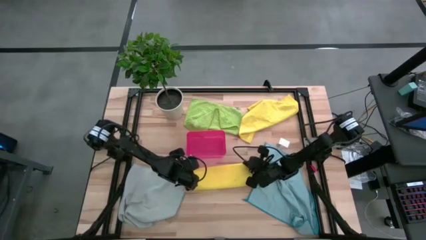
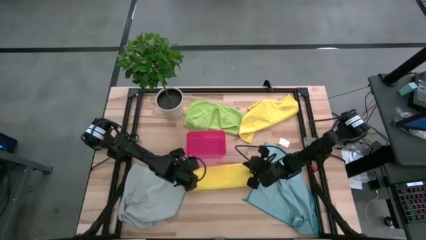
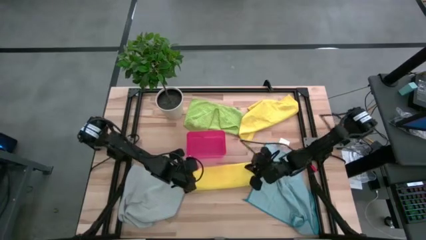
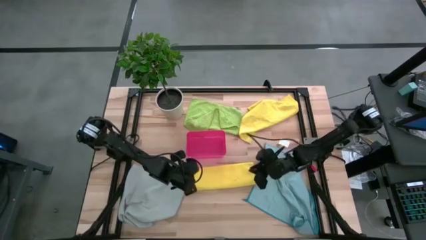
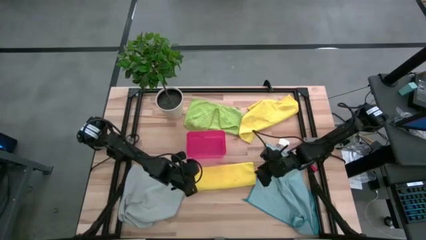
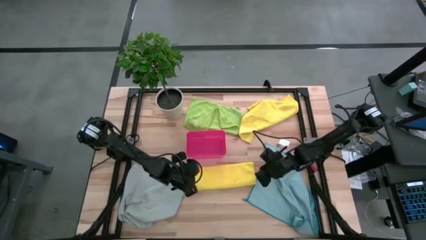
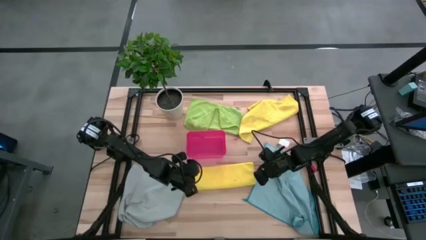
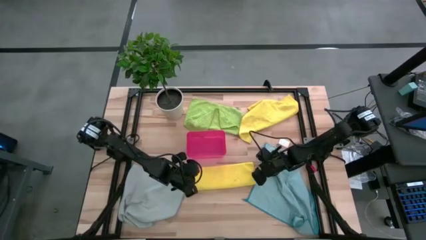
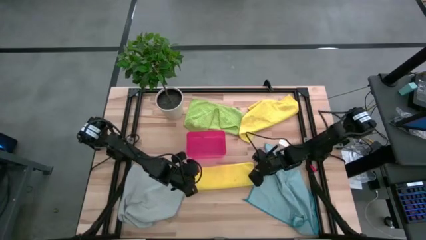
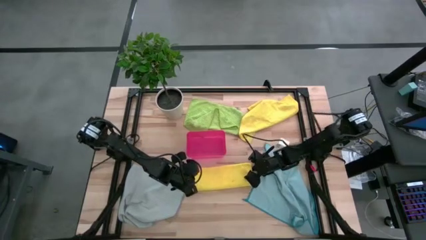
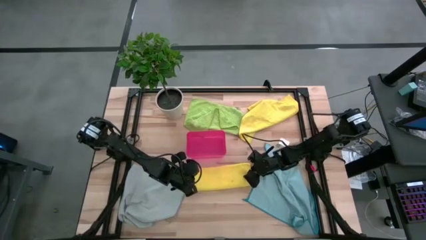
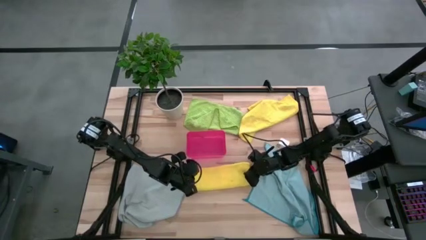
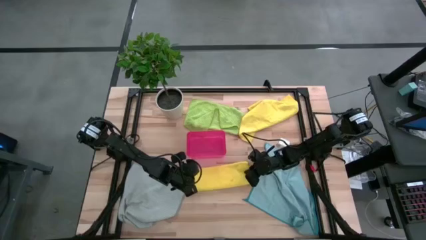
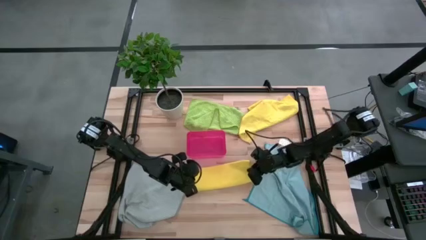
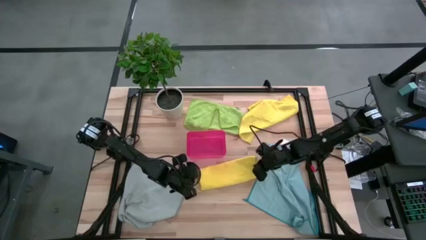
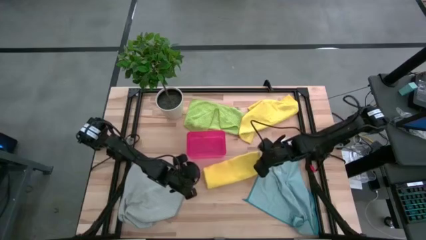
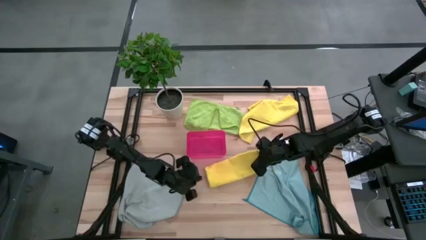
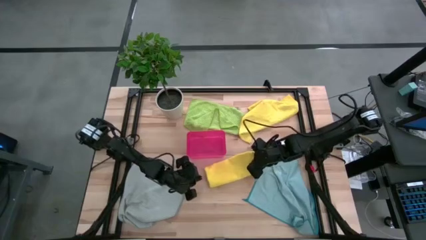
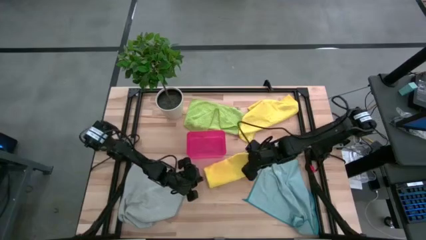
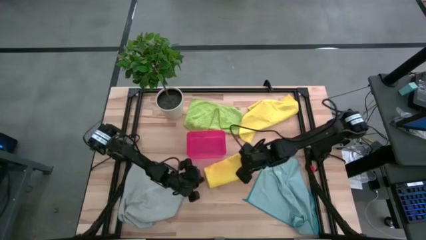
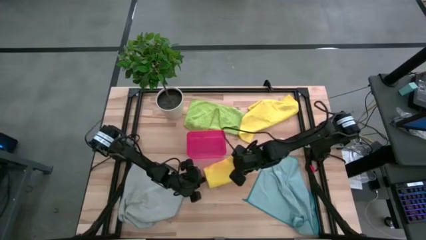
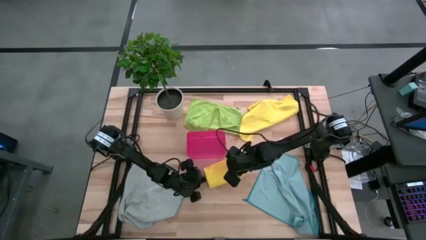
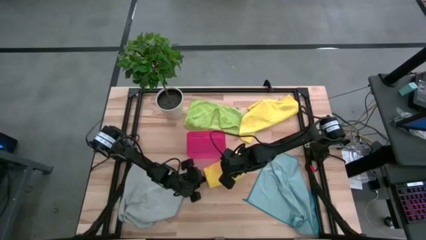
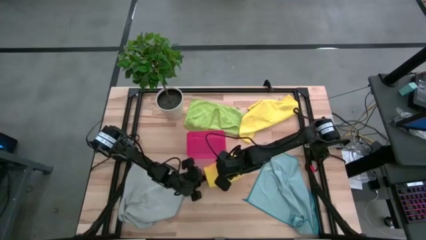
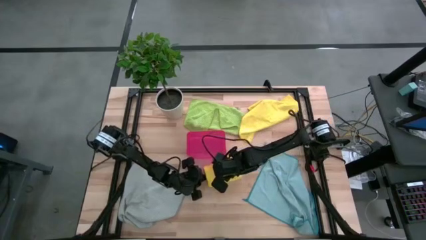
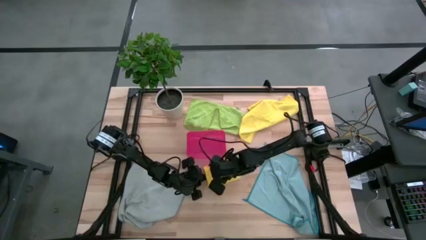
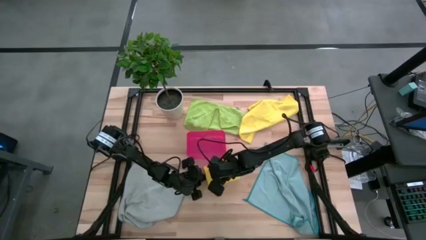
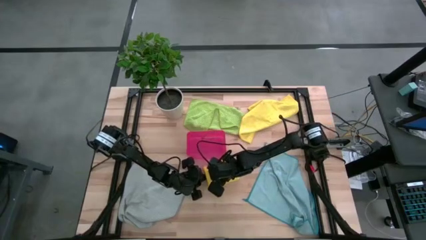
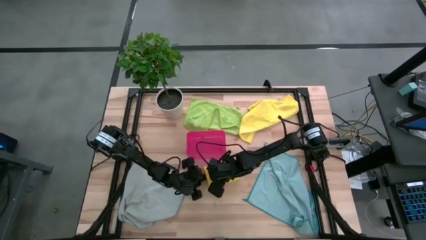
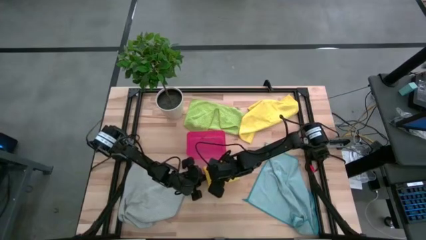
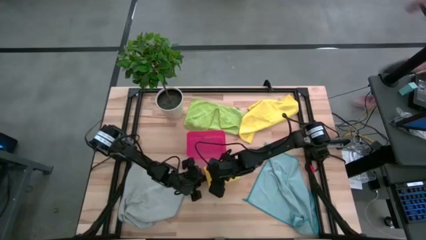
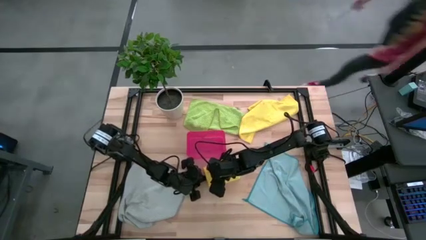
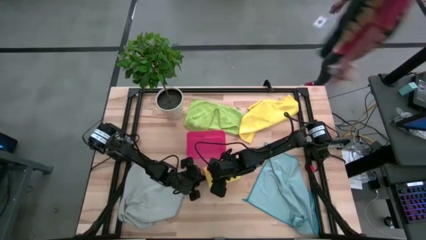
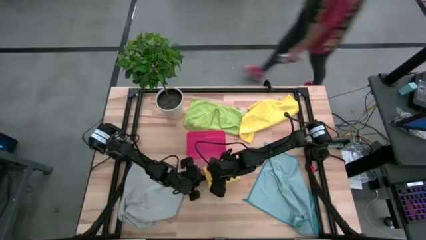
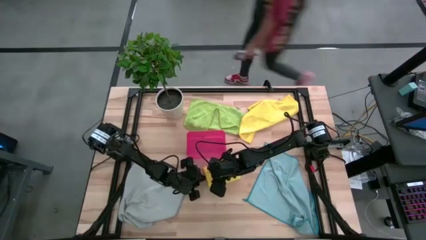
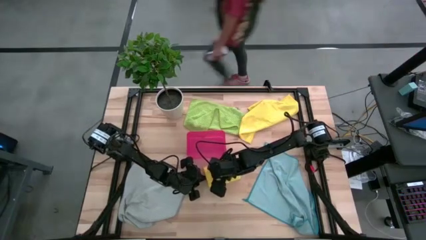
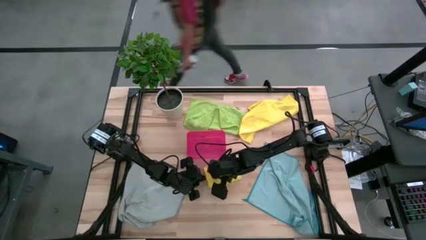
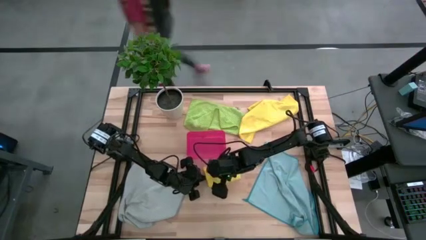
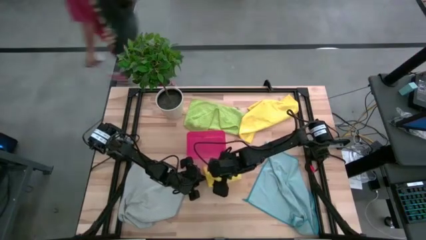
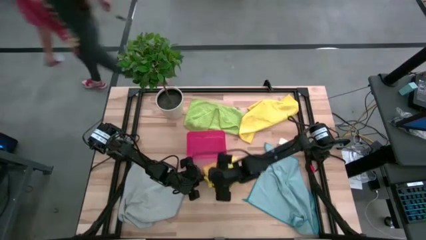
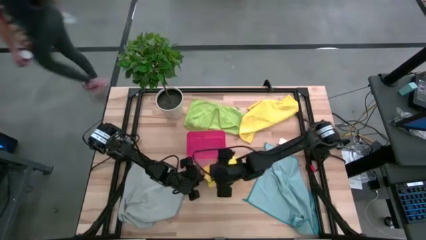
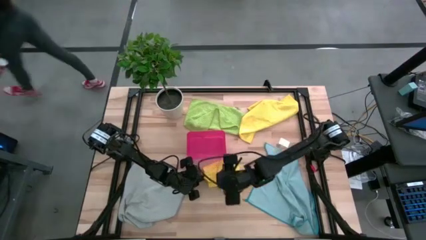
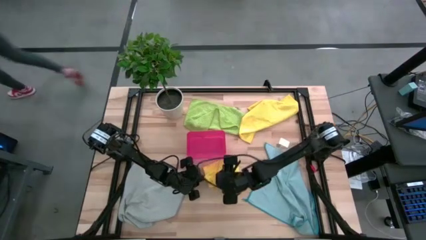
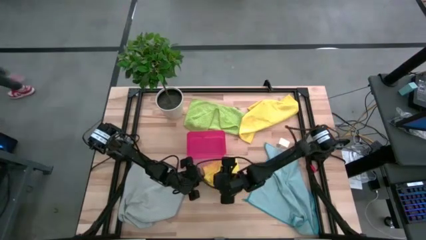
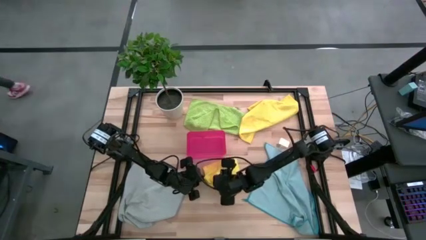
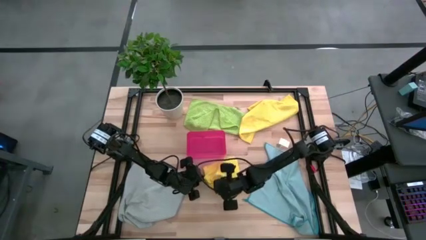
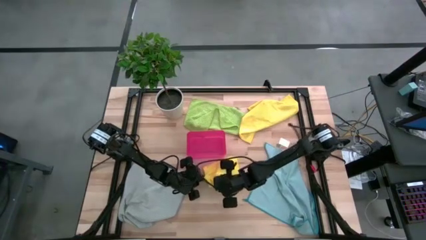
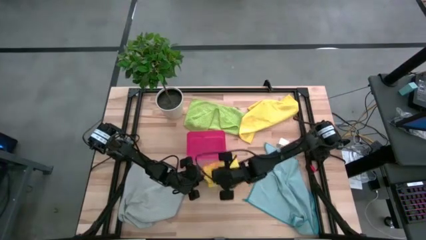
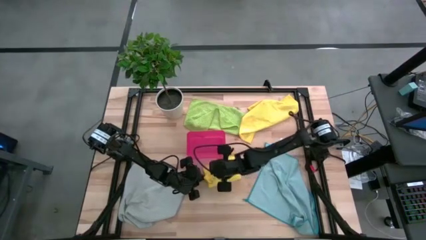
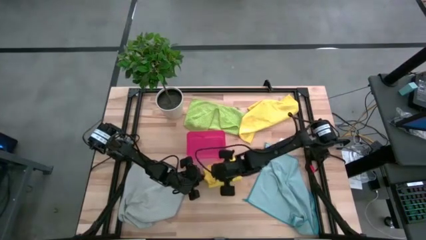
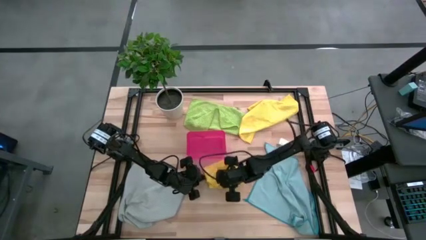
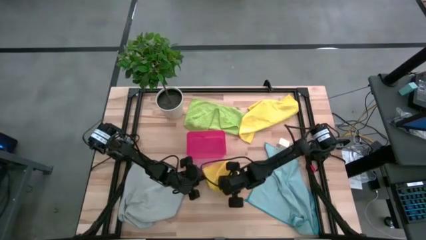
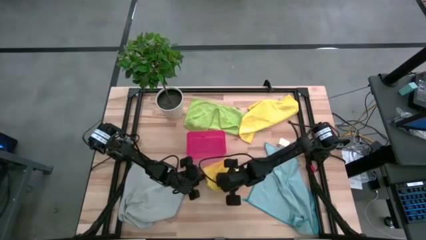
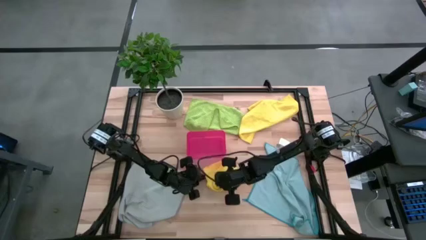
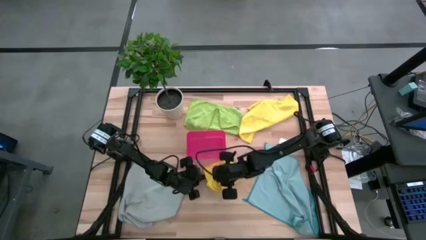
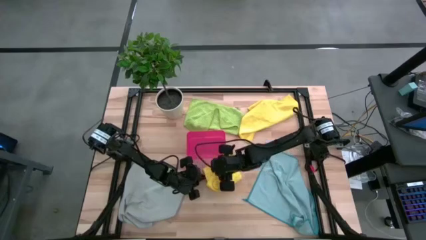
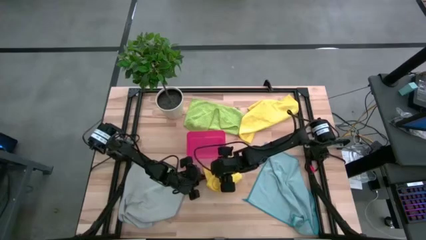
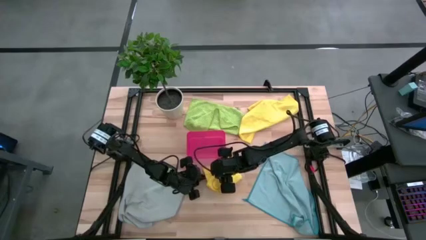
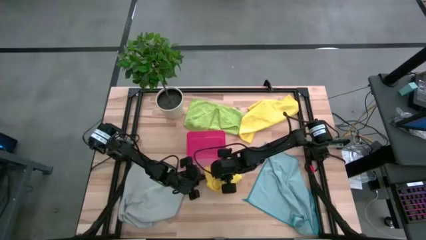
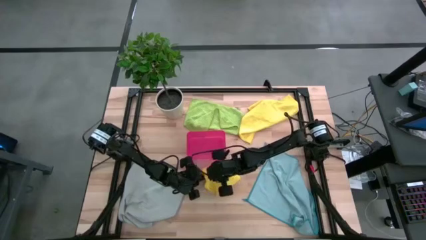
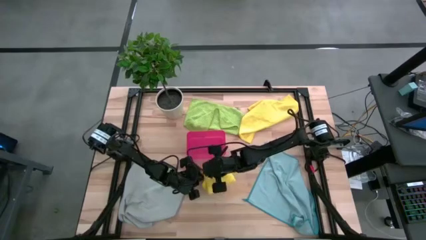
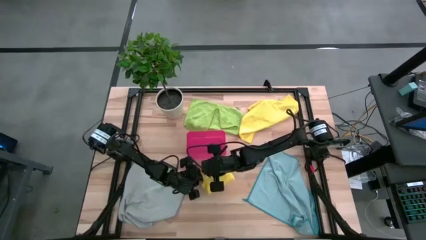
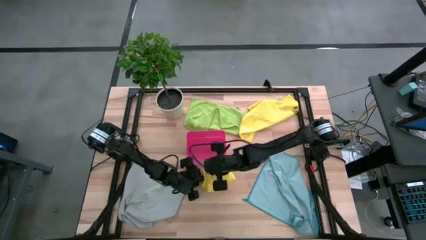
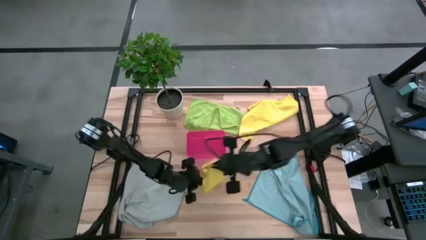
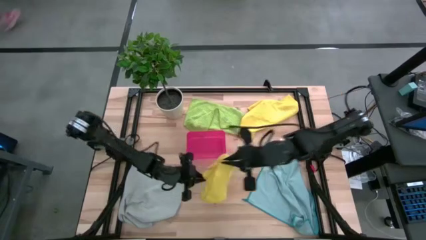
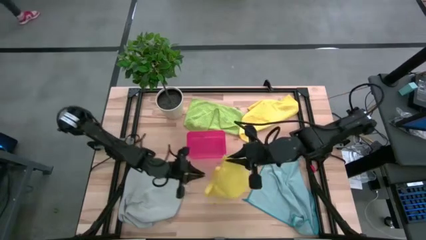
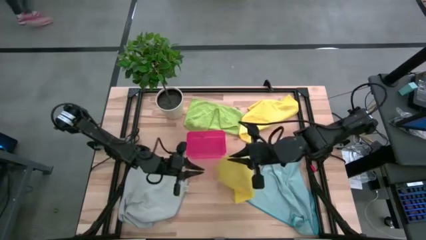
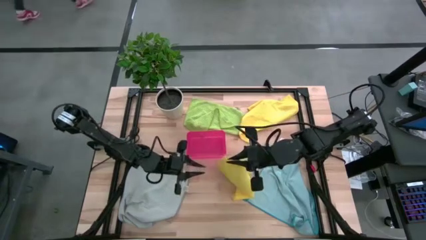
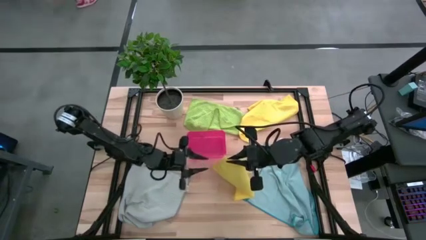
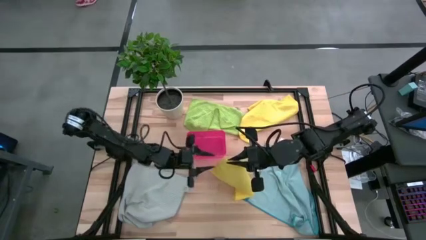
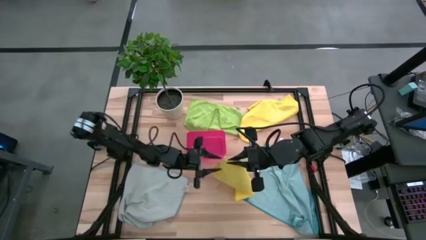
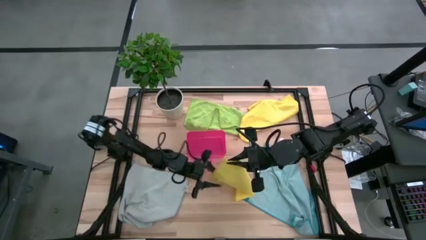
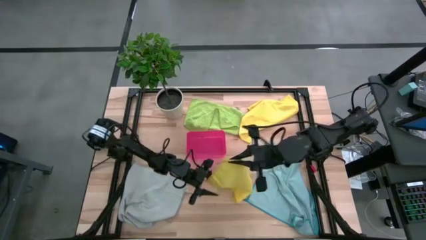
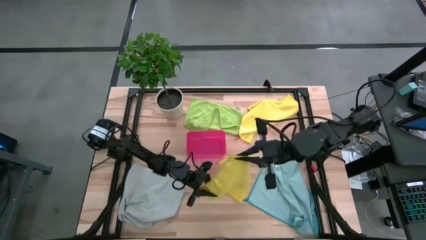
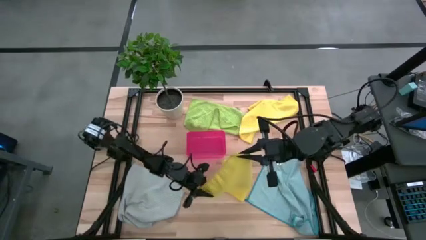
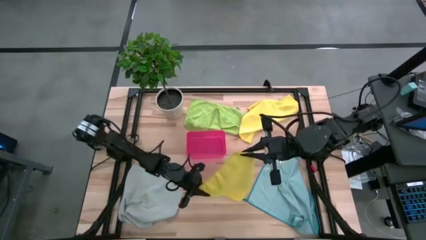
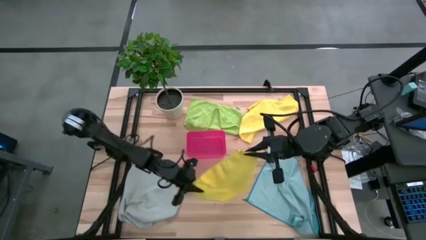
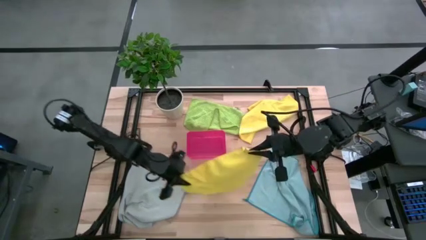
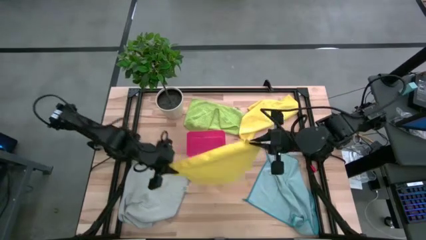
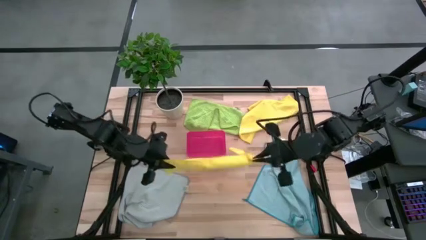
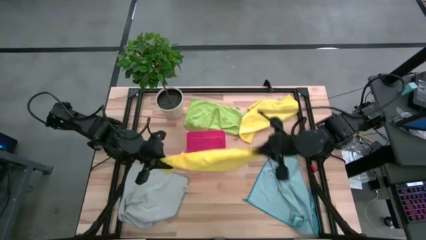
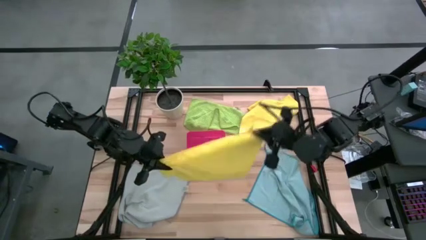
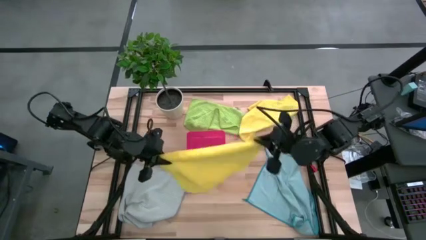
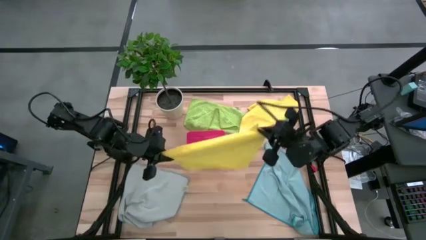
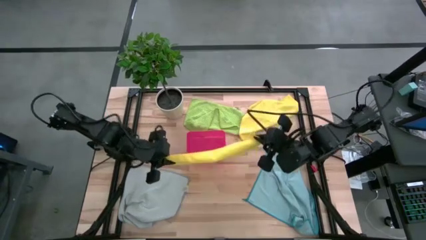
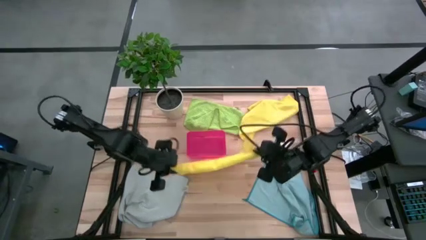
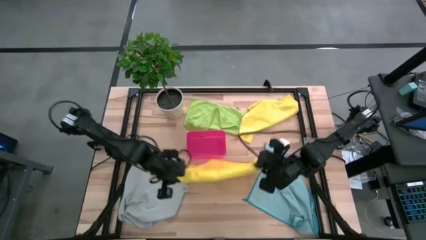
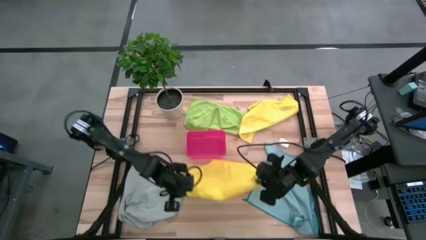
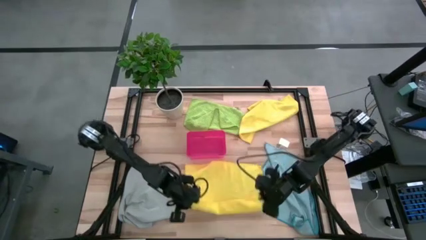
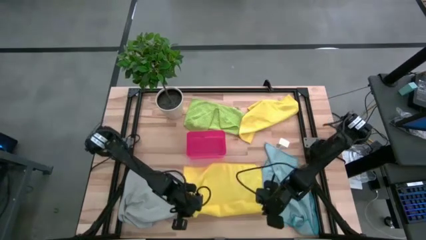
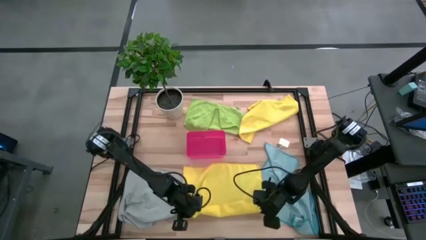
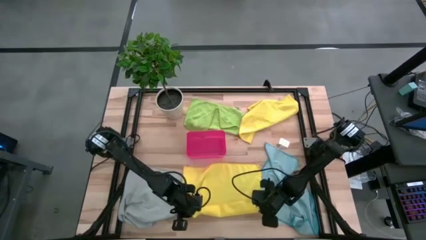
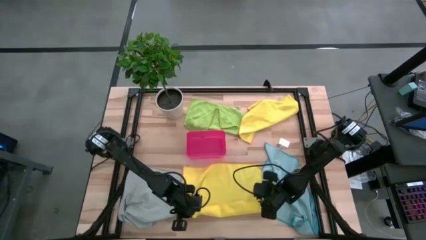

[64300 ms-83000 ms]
Task: Fold microfiber towels
Fold the bottom yellow microfiber cloth
